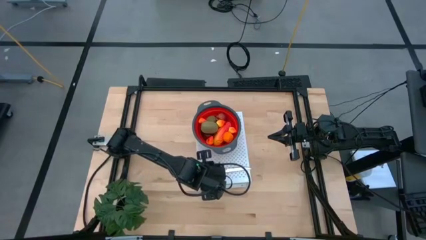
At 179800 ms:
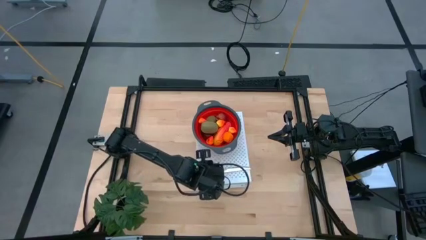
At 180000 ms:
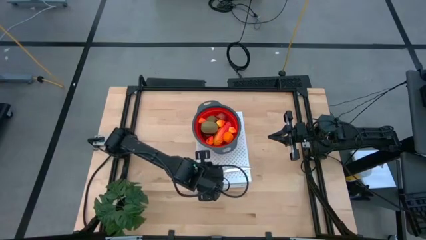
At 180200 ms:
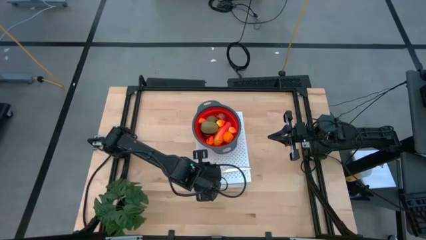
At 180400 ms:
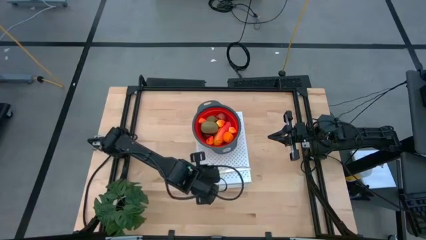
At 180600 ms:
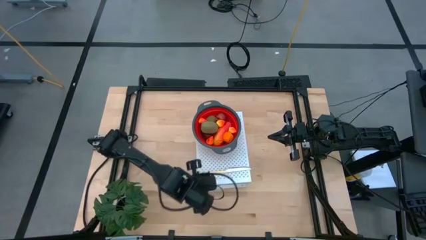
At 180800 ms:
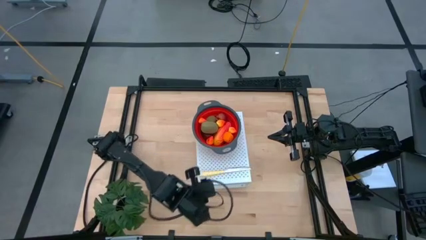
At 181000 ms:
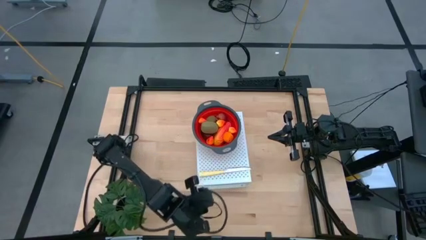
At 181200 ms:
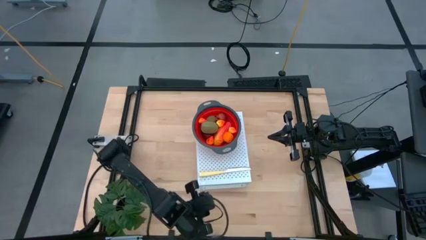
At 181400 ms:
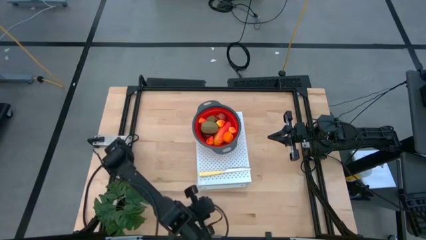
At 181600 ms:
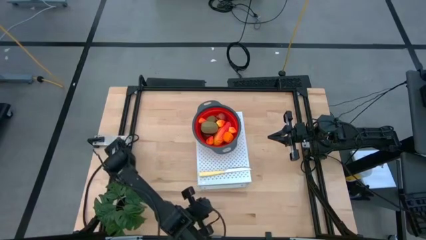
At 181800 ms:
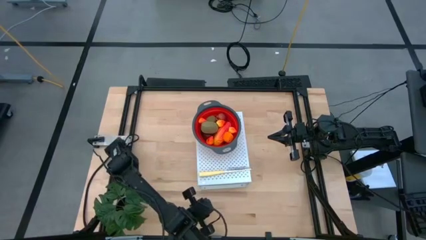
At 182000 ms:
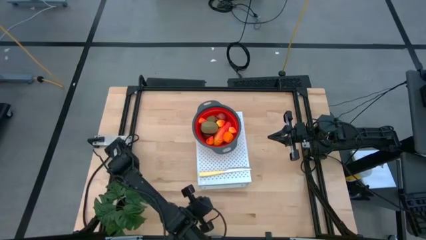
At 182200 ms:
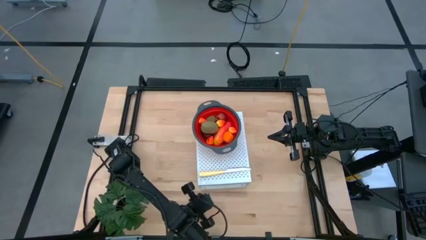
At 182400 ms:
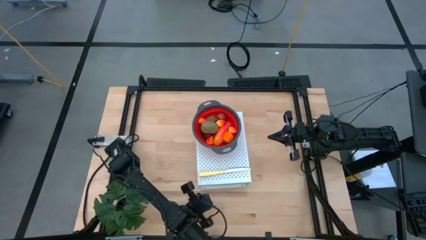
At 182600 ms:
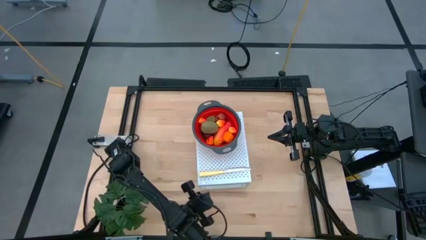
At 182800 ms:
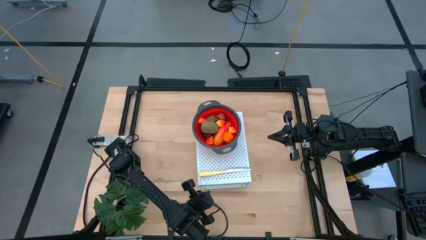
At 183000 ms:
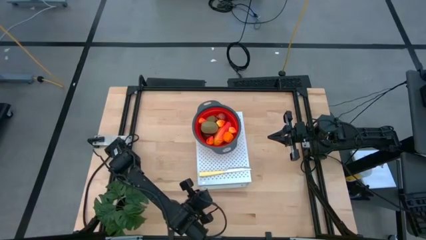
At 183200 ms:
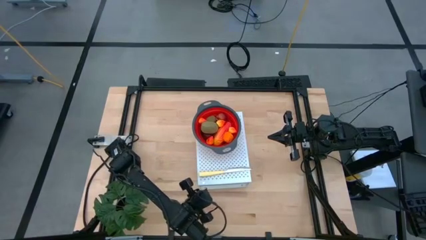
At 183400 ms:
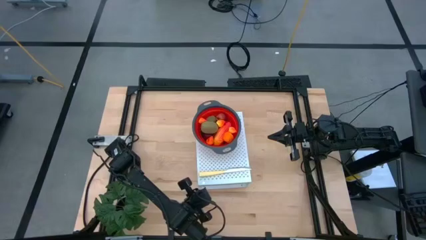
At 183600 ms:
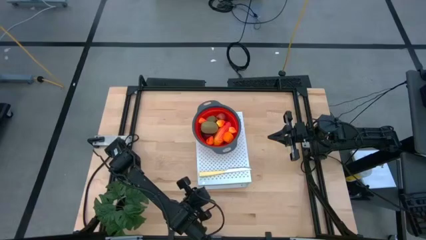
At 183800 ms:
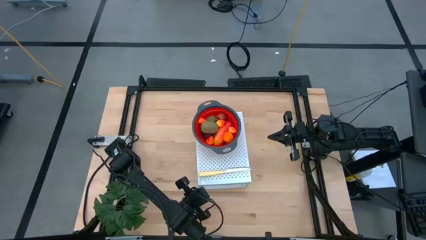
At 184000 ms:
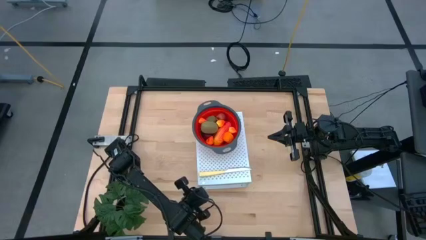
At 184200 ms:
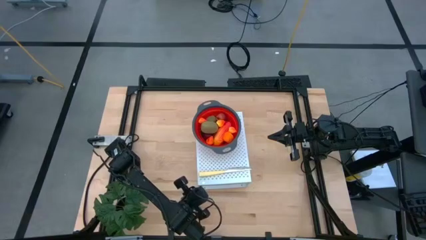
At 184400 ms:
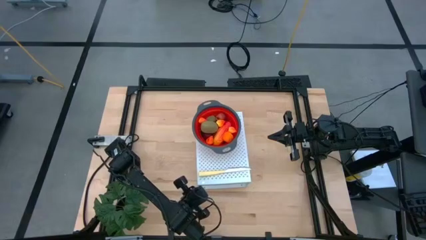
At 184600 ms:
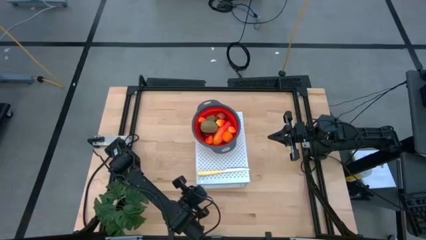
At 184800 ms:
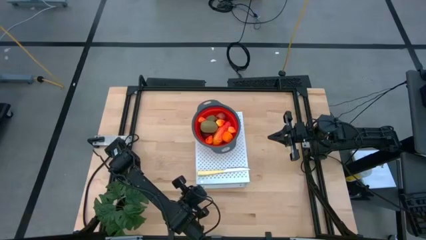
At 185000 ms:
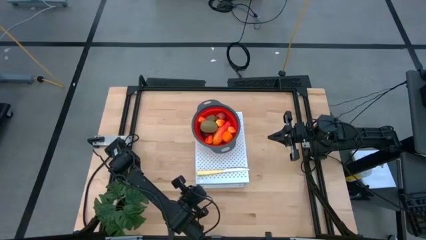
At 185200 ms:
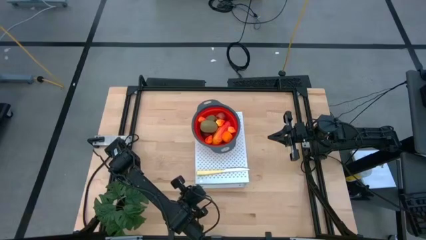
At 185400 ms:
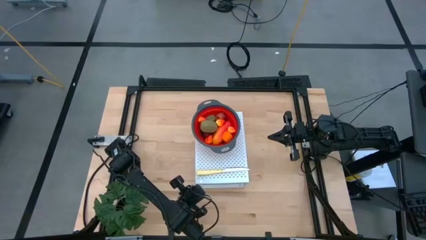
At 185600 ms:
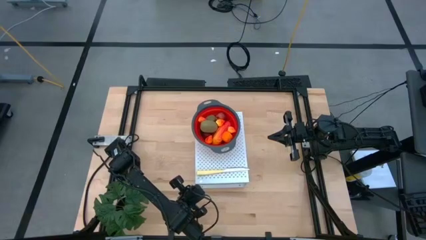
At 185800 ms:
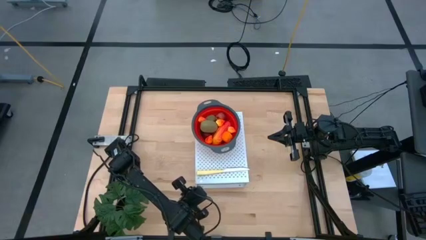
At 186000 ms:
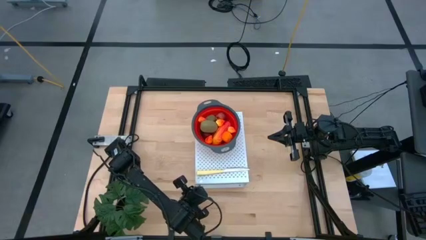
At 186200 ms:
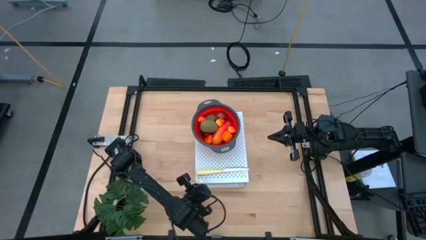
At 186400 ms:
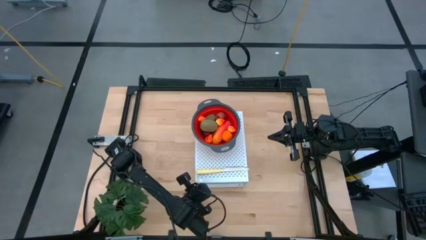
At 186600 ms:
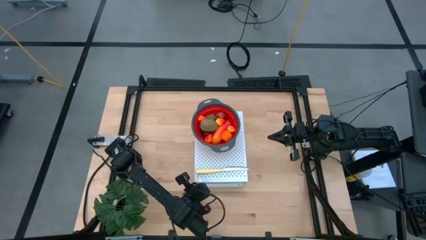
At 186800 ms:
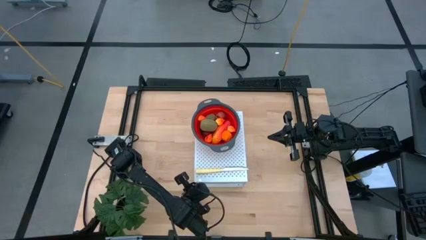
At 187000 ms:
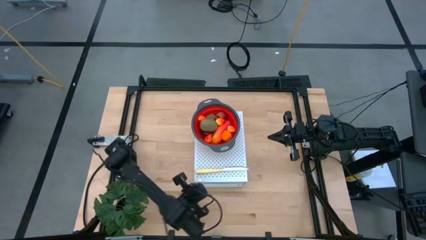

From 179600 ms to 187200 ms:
Task: Pick & Place Fruit
Adjust the shelf

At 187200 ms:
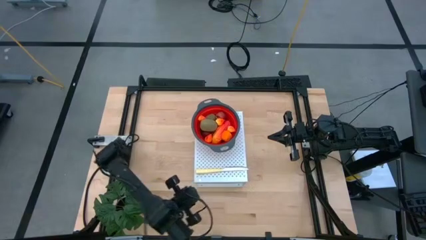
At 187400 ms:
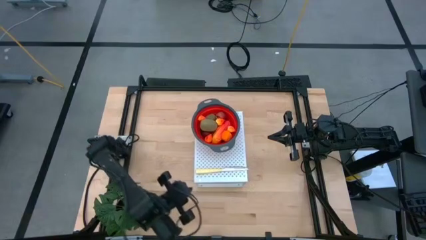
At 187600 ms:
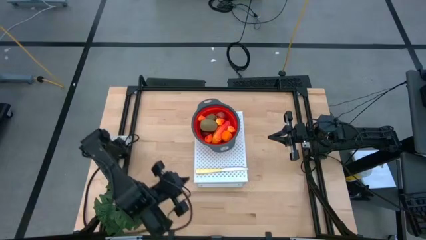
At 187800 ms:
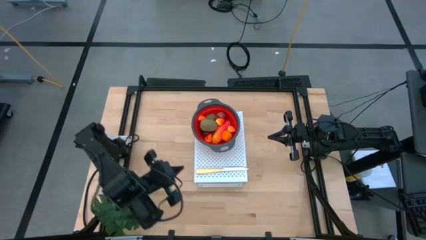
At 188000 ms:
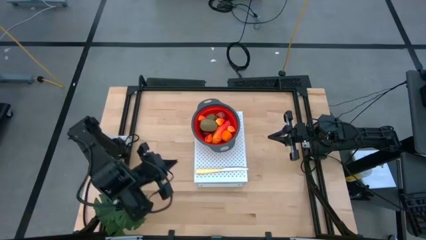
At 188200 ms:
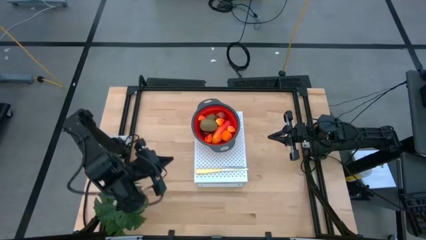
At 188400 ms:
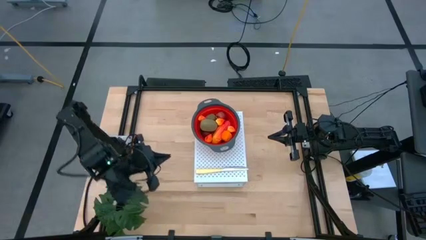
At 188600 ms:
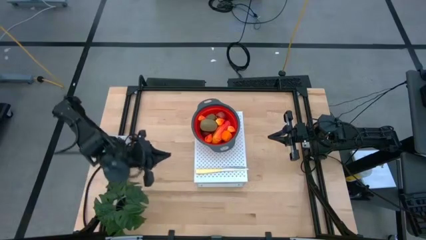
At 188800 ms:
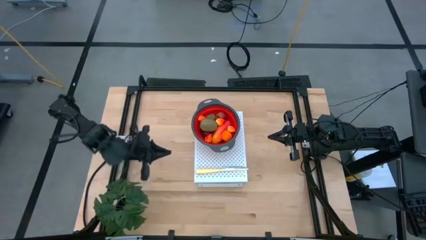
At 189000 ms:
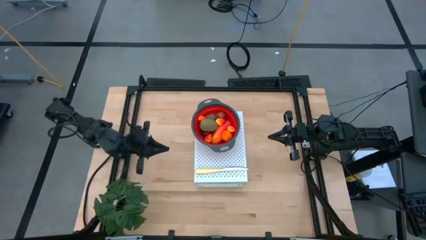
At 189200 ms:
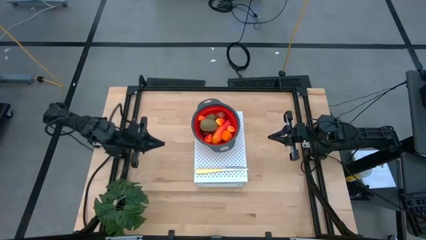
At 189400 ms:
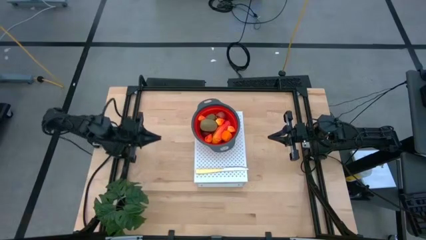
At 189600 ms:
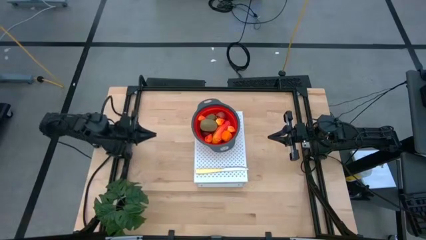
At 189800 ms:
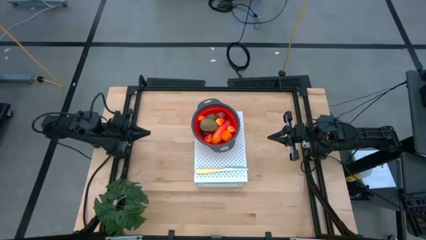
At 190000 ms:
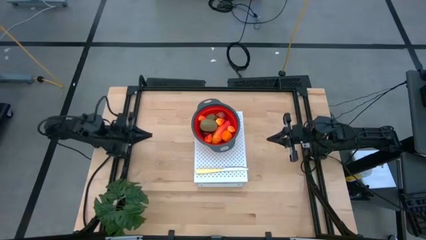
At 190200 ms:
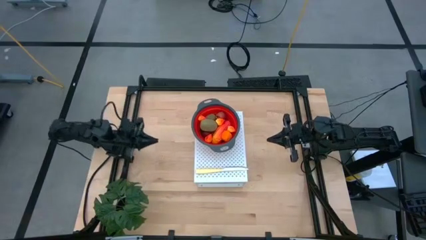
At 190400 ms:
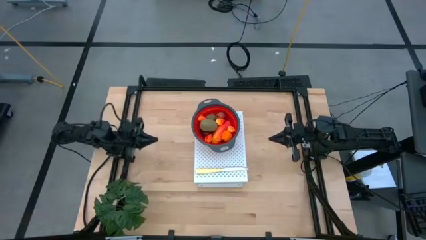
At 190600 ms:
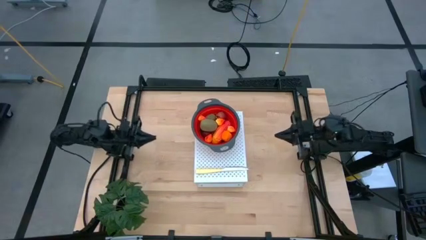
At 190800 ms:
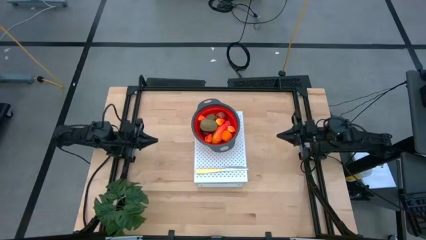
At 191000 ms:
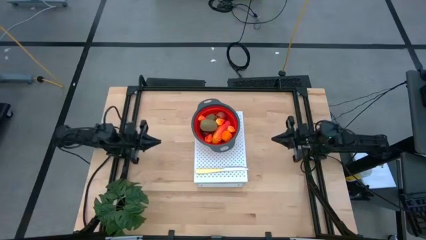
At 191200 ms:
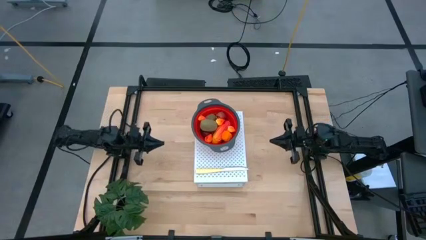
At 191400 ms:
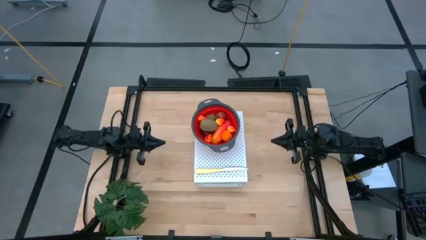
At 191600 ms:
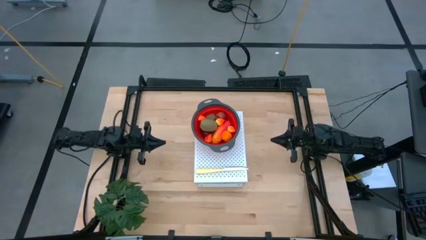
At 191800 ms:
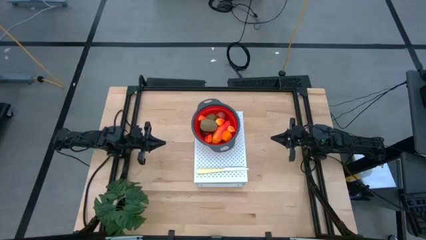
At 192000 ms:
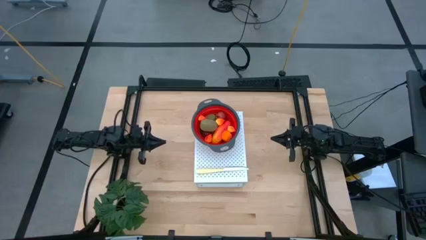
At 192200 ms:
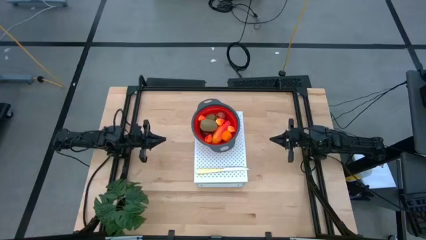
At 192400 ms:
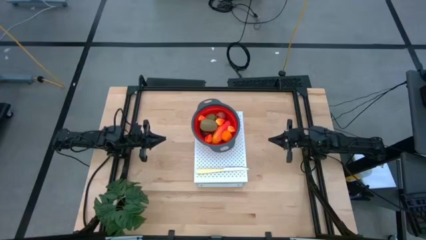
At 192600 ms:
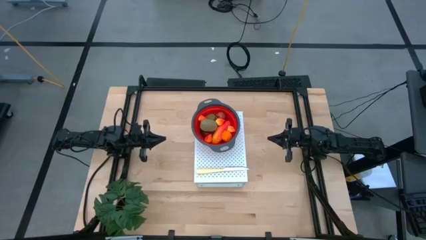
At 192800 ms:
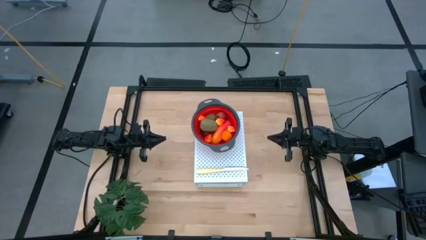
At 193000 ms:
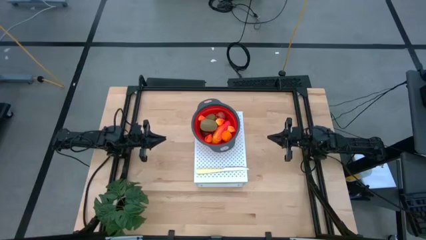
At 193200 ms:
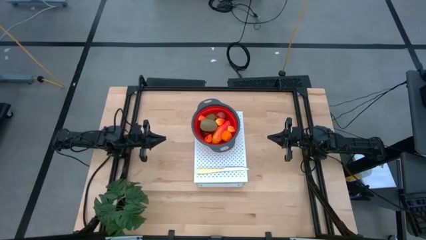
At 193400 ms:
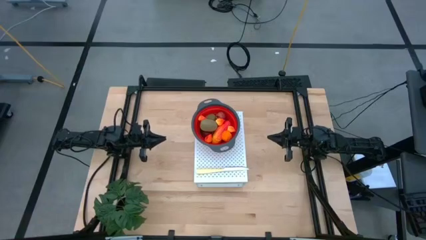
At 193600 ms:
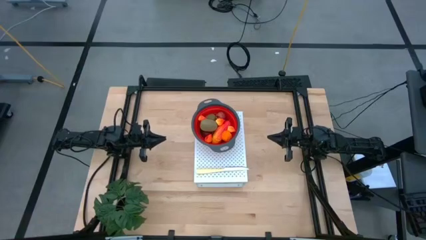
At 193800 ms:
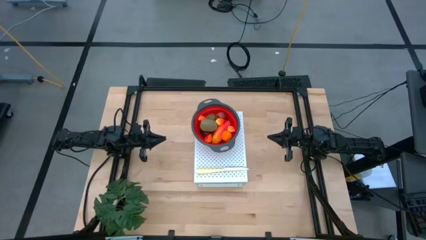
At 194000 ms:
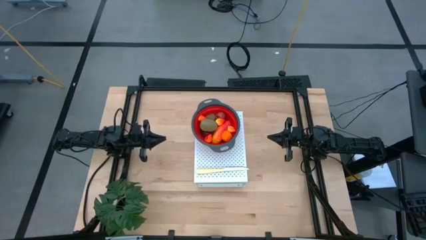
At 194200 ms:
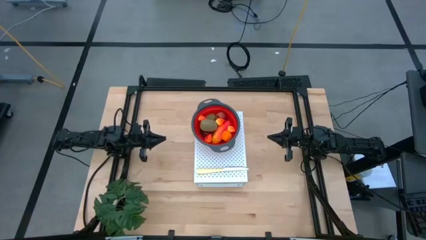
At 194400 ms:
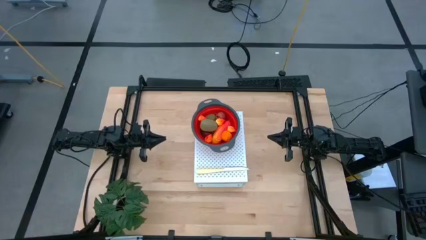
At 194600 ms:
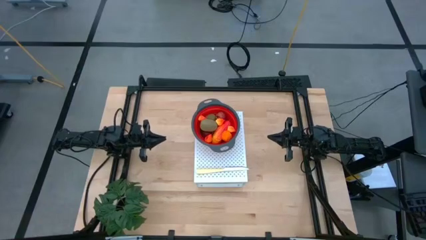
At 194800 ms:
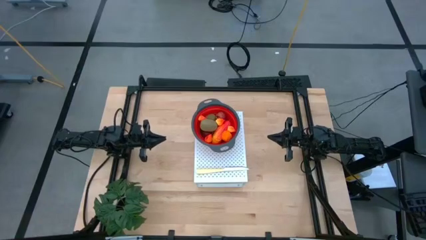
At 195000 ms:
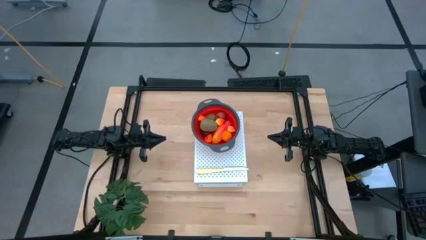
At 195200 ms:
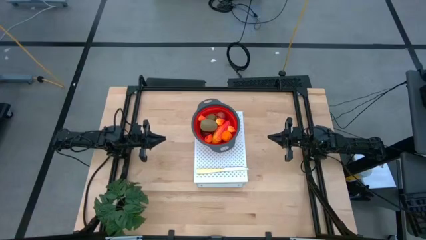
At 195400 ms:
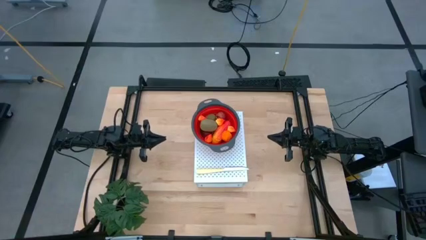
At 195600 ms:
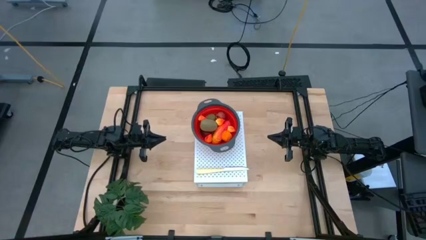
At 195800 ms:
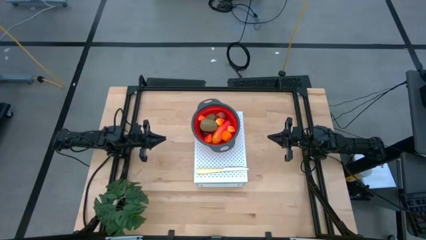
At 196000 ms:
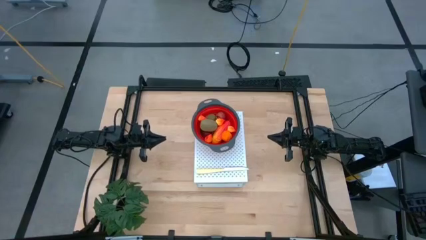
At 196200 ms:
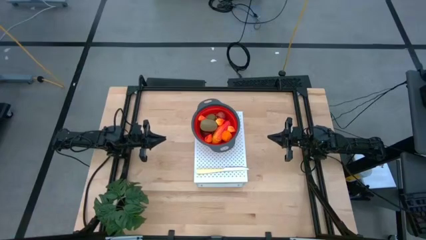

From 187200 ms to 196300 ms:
Return to Home Position

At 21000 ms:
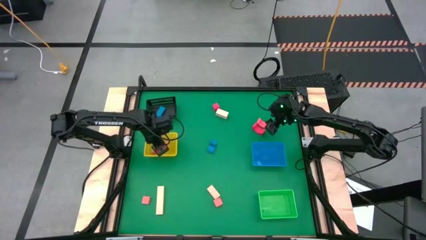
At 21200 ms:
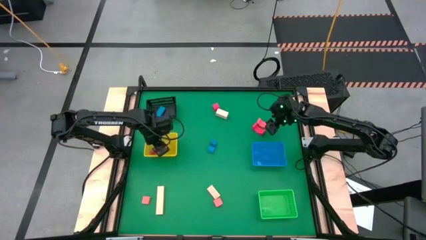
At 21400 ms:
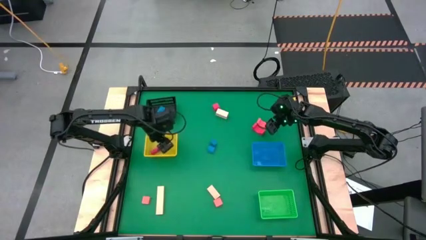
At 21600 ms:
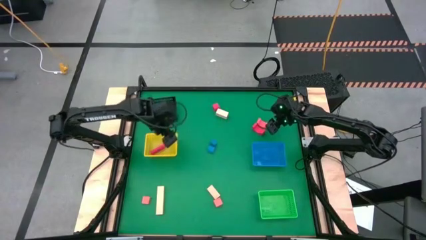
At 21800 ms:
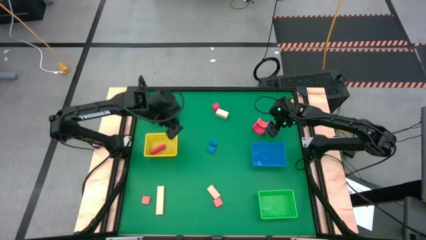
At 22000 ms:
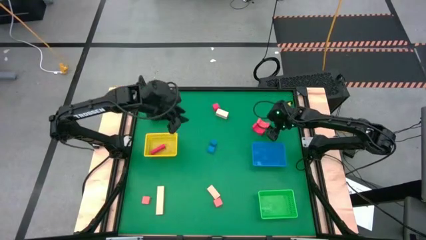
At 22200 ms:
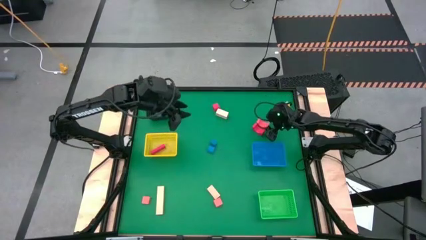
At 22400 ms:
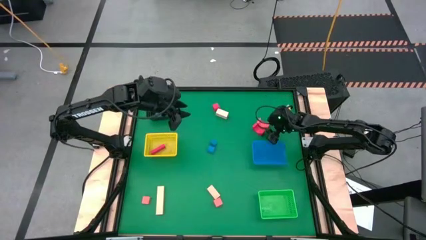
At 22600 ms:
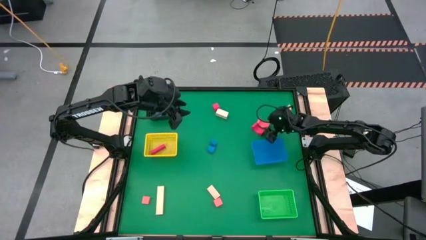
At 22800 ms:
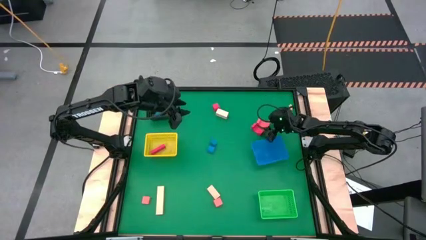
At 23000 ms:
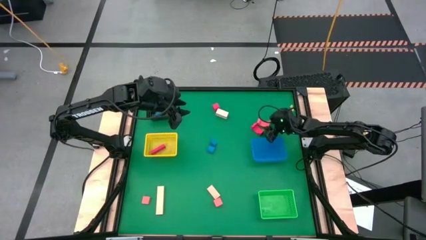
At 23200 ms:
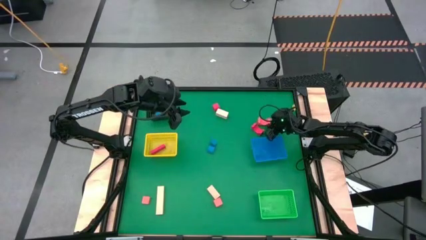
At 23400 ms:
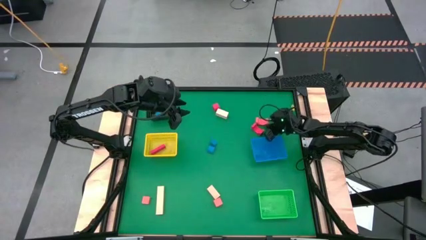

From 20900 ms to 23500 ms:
Task: Sort & place blocks by color
Put the top right orange block into the blue bin
